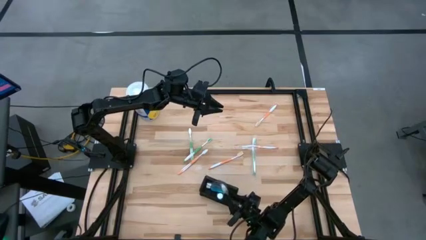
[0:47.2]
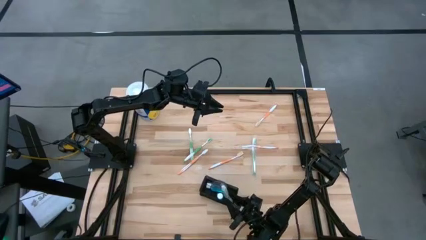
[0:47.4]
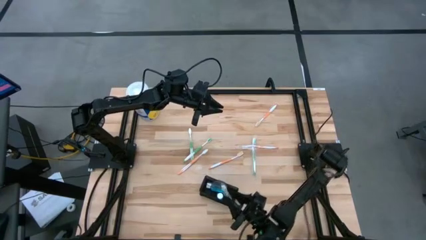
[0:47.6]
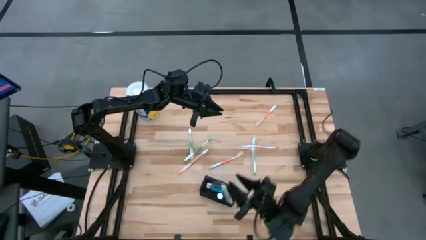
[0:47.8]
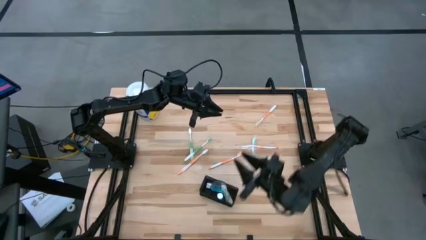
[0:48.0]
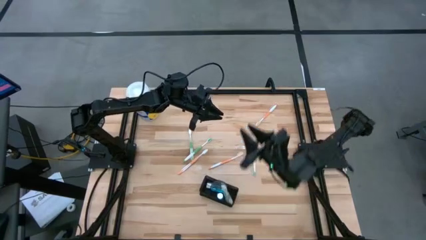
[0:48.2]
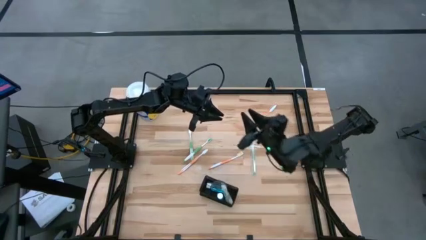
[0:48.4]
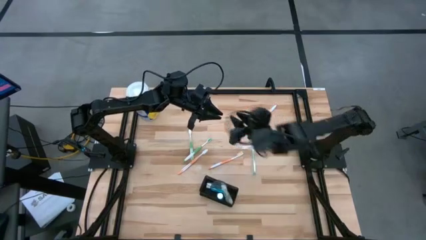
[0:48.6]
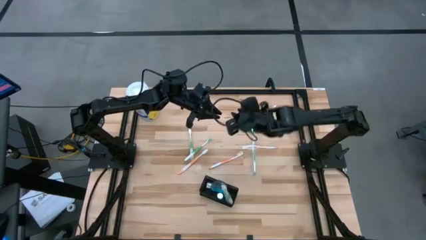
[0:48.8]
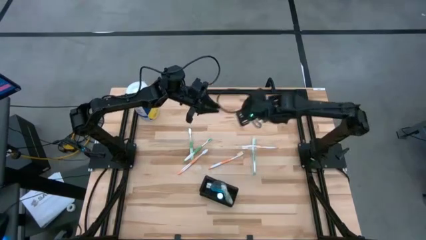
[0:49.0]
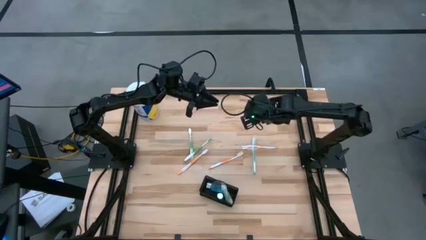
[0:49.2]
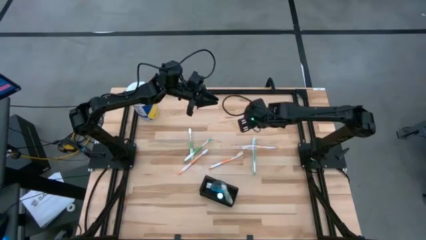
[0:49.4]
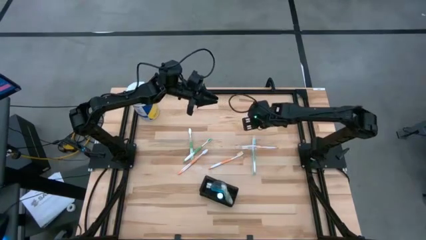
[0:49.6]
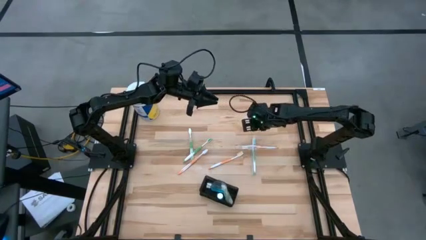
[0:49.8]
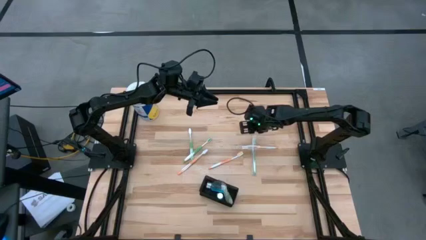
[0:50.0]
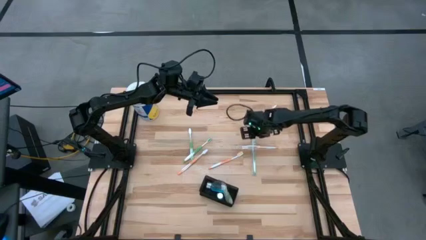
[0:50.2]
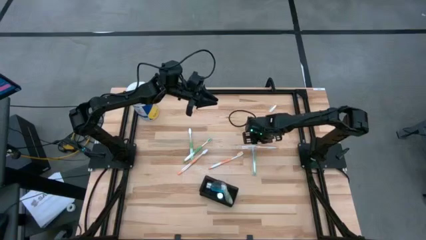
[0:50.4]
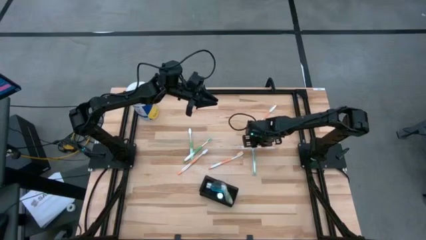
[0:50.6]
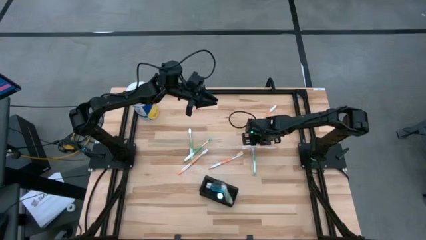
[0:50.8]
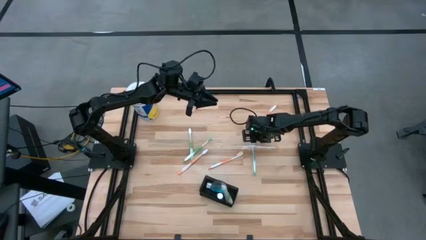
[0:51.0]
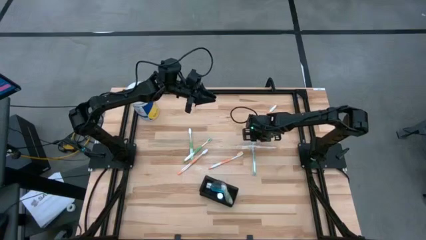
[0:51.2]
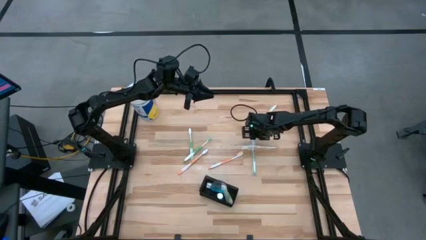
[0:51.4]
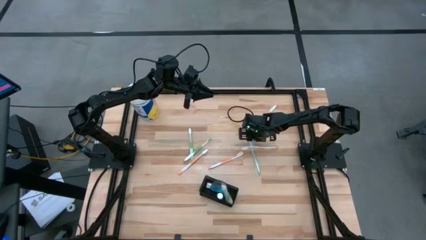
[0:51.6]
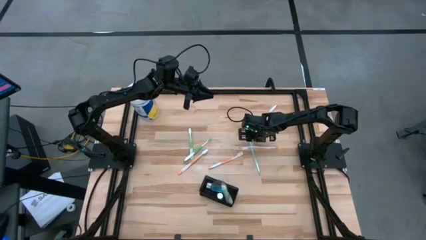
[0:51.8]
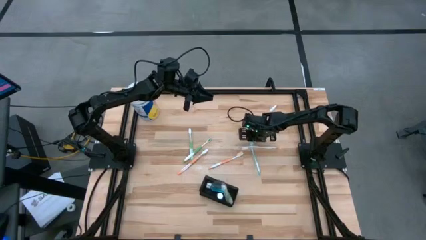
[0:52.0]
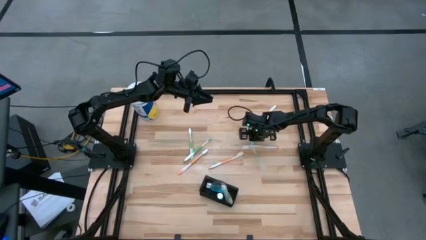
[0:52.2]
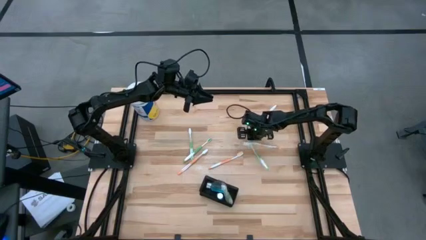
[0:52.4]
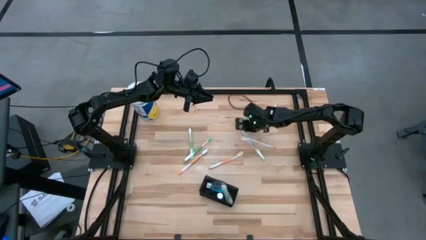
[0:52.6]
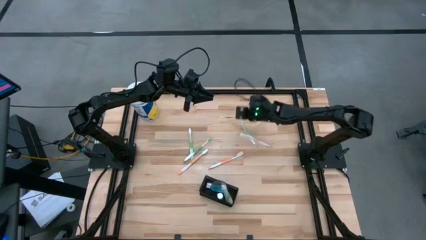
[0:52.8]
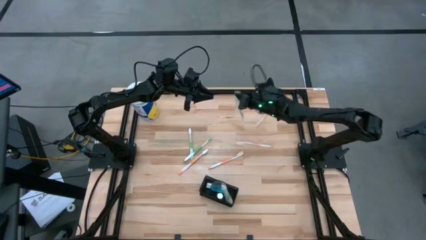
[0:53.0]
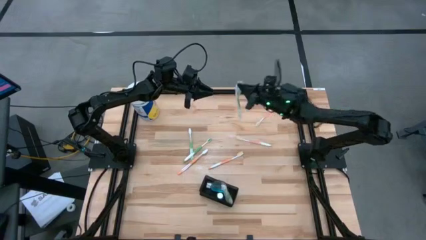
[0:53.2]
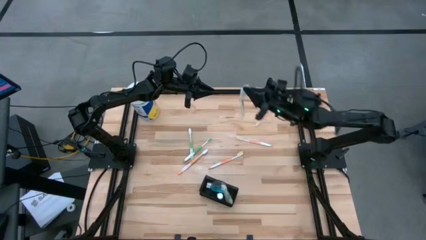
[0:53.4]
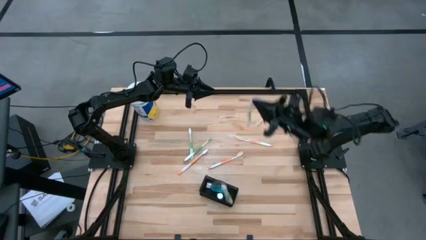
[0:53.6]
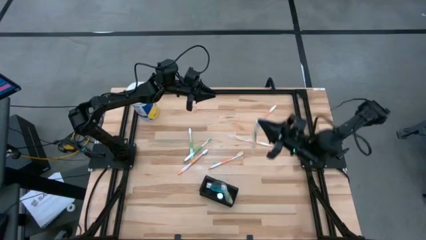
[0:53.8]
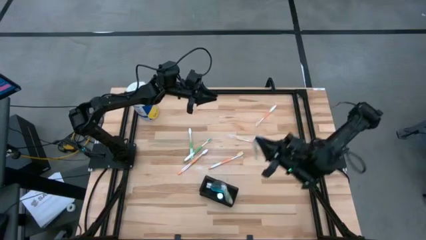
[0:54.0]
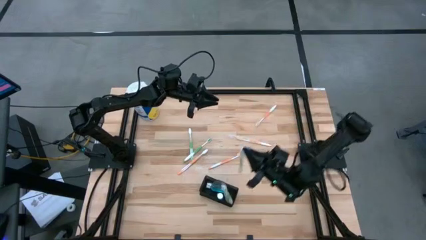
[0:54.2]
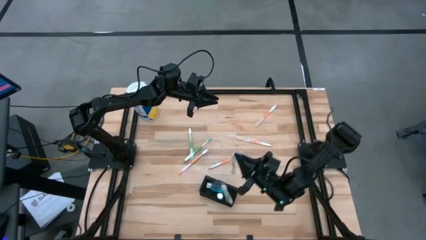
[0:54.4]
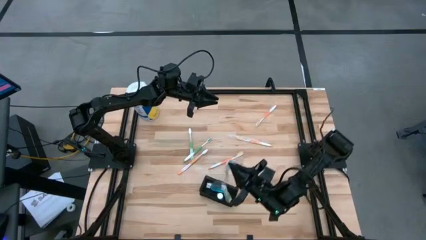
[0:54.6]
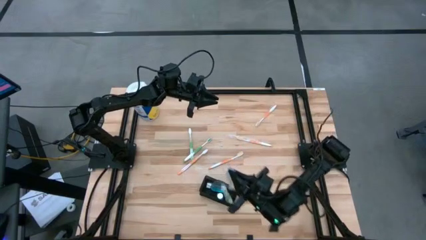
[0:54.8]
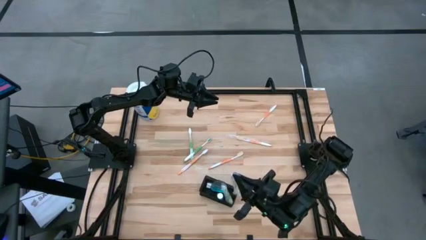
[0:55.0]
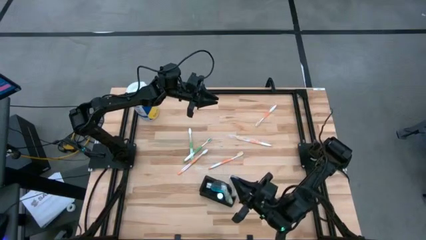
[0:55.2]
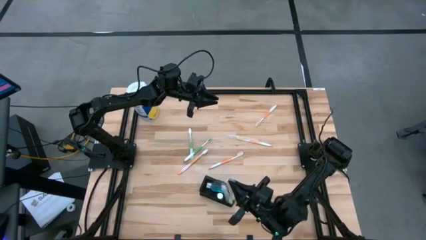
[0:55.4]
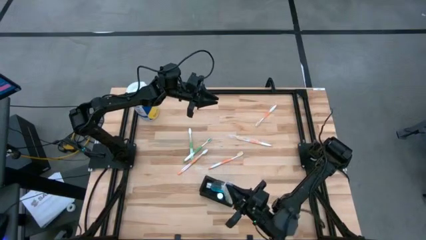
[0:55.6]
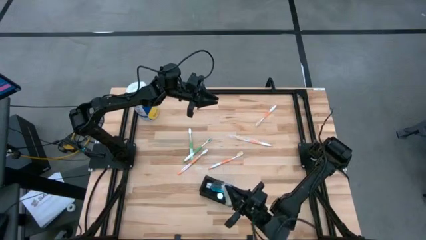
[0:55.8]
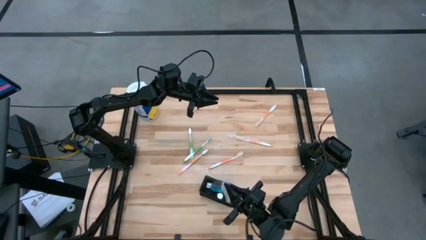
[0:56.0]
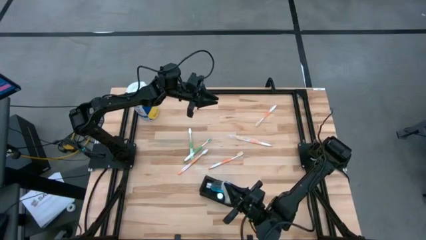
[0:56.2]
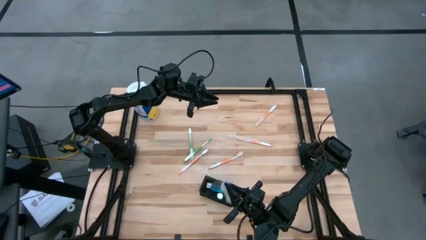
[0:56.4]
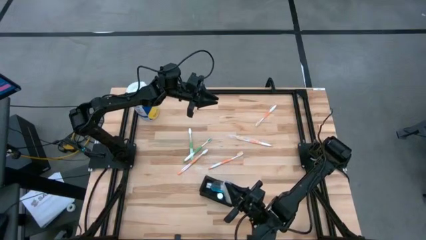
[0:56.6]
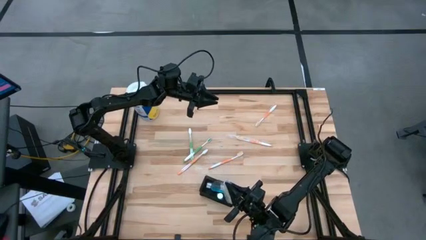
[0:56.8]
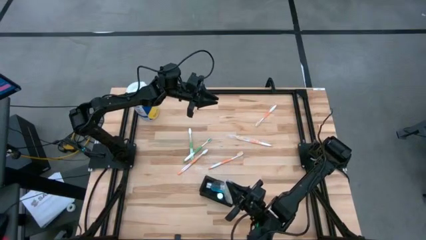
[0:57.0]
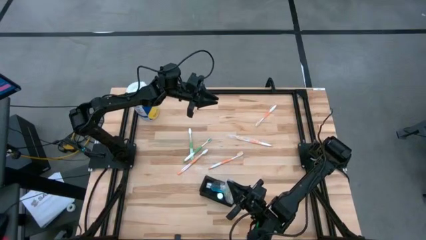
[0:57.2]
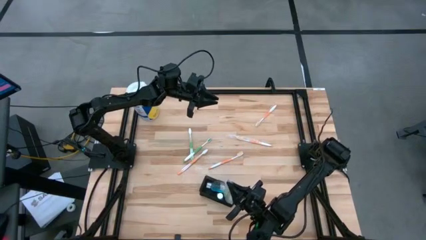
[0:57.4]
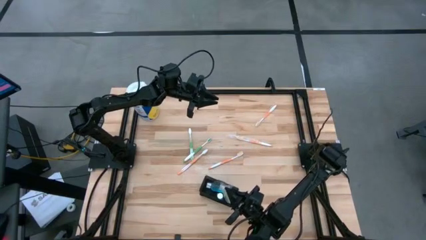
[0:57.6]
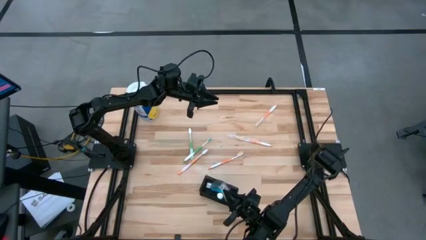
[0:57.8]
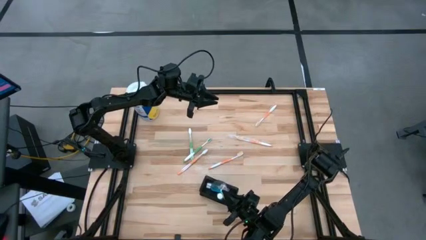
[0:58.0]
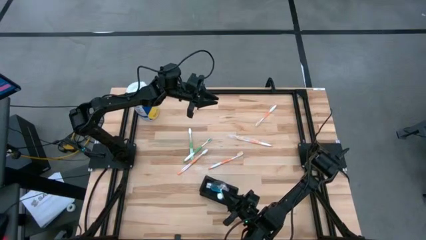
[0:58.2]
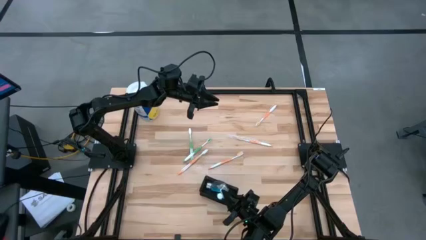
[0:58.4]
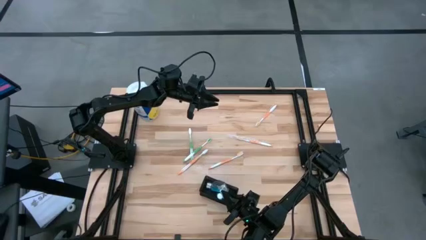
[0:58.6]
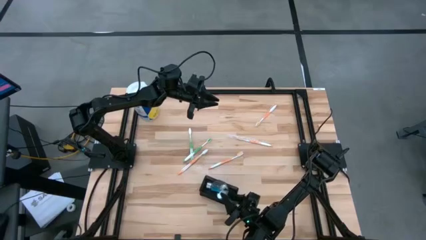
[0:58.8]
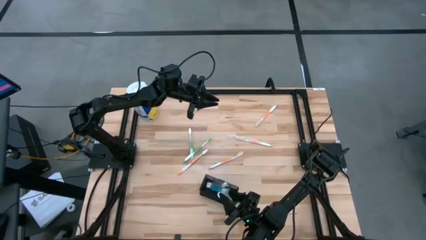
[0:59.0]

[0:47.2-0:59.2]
Task: Pick & Place toothbrushing station
Put the green toothbrush into the black wire organizer
